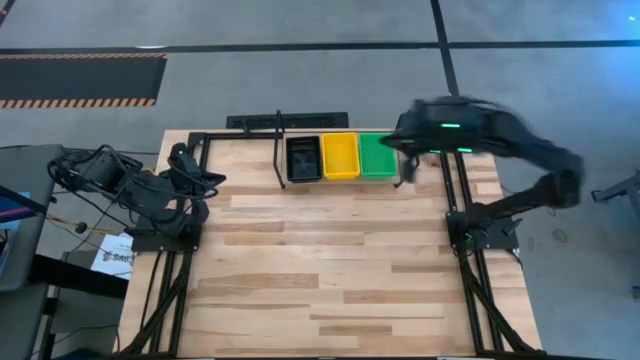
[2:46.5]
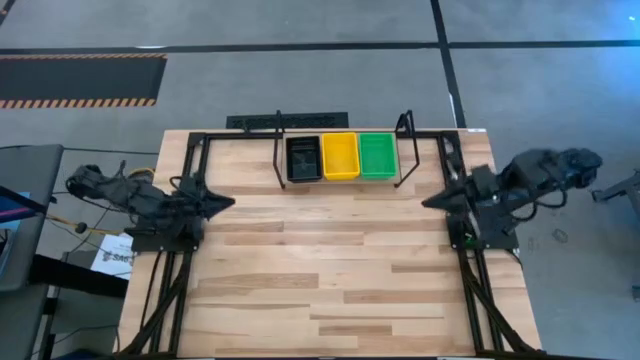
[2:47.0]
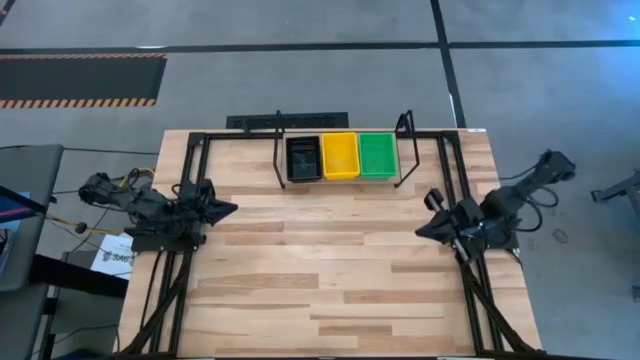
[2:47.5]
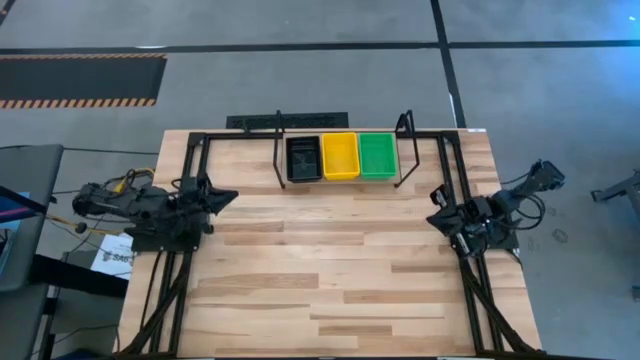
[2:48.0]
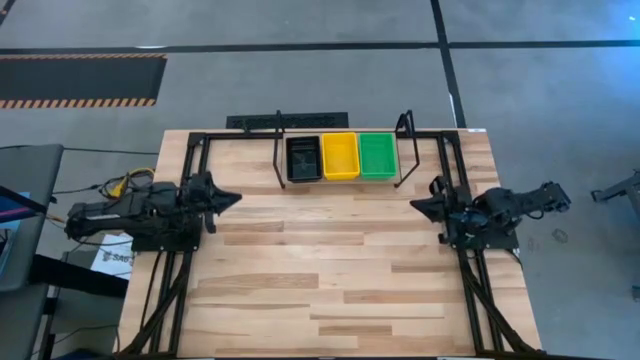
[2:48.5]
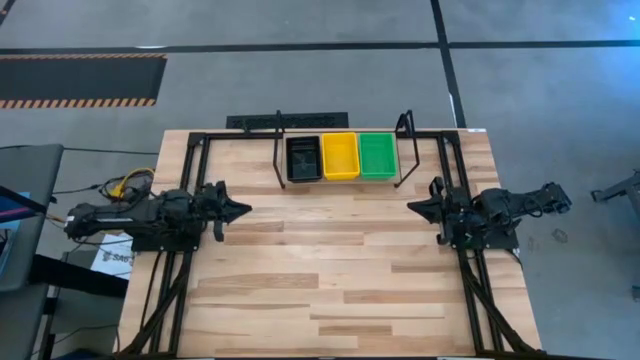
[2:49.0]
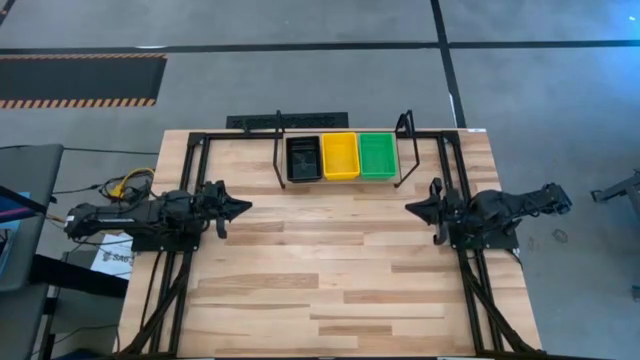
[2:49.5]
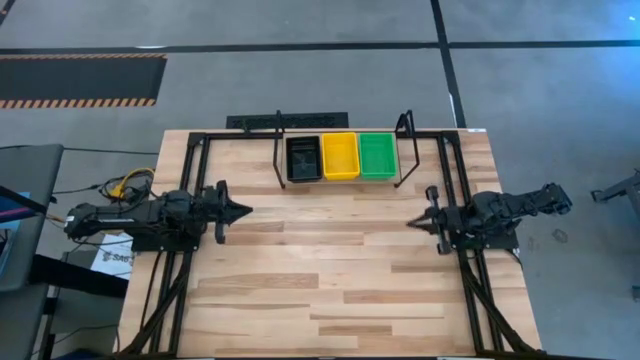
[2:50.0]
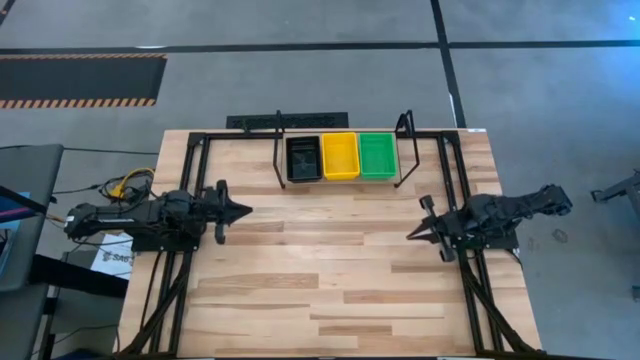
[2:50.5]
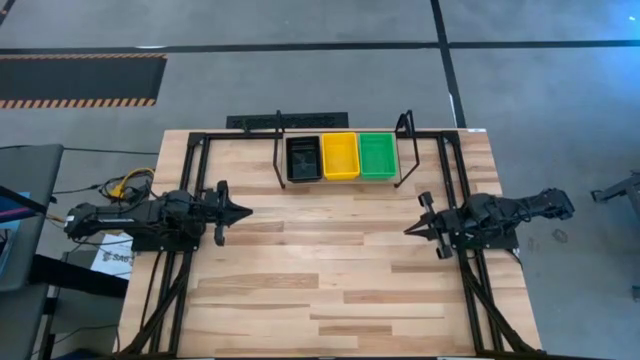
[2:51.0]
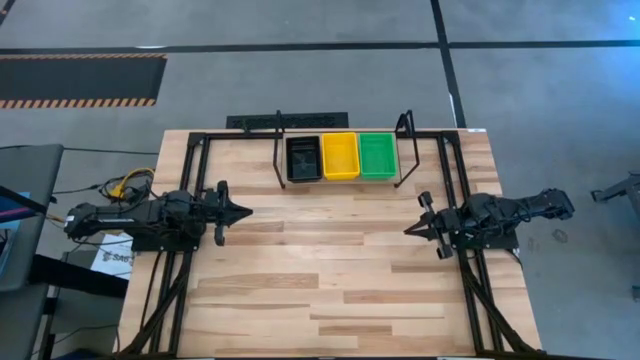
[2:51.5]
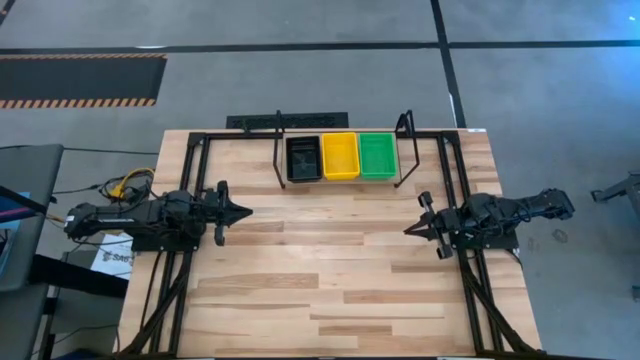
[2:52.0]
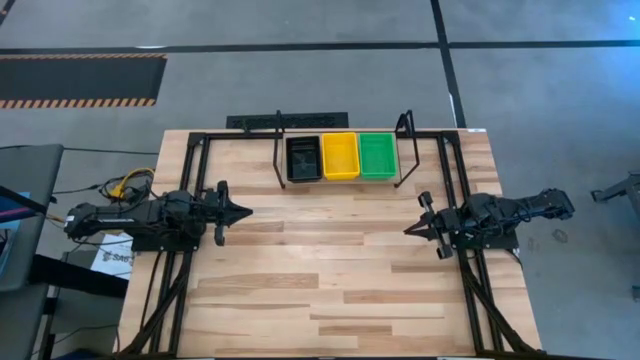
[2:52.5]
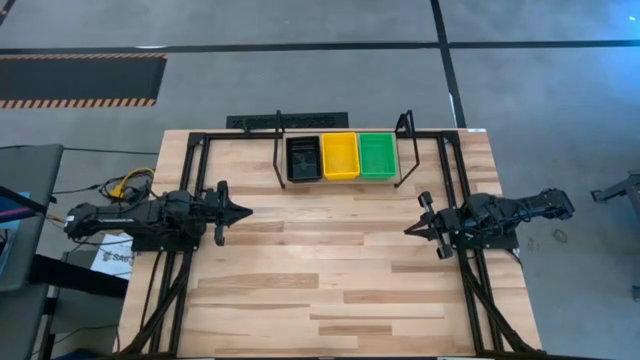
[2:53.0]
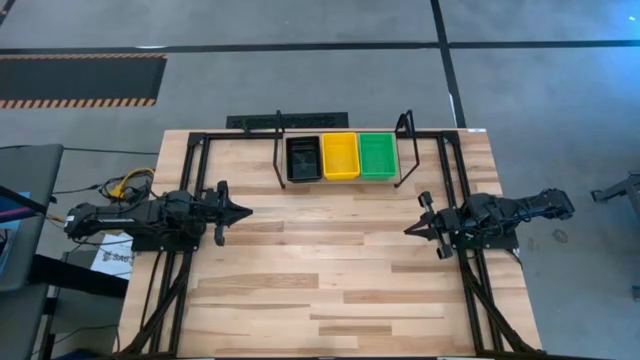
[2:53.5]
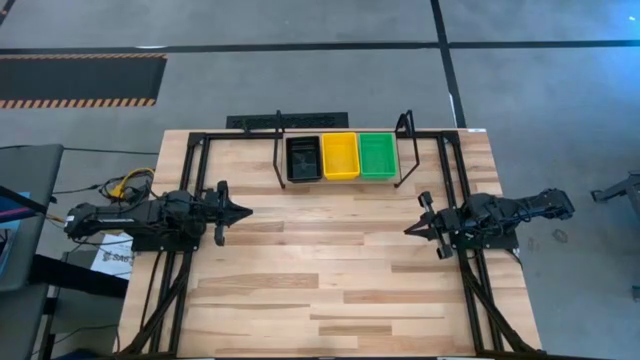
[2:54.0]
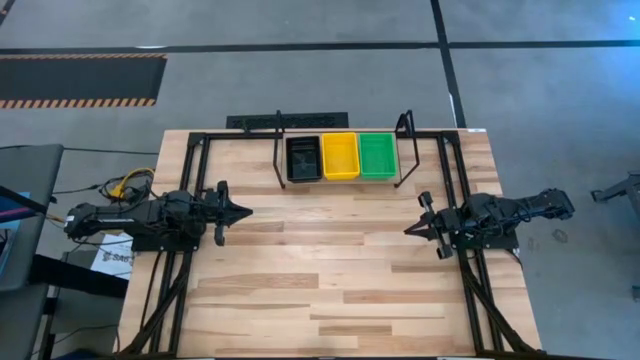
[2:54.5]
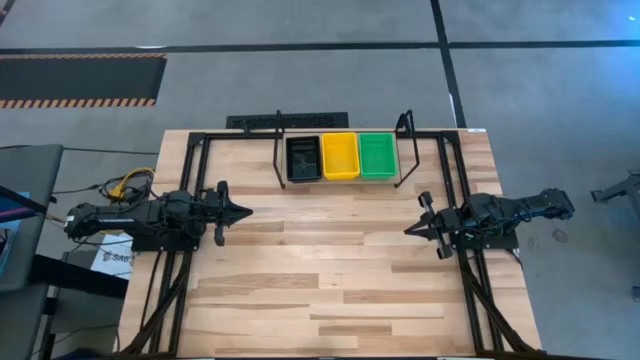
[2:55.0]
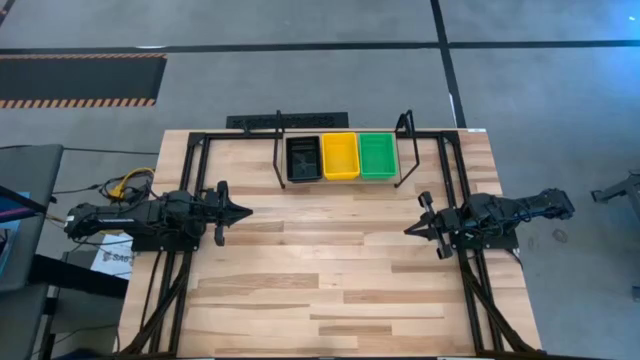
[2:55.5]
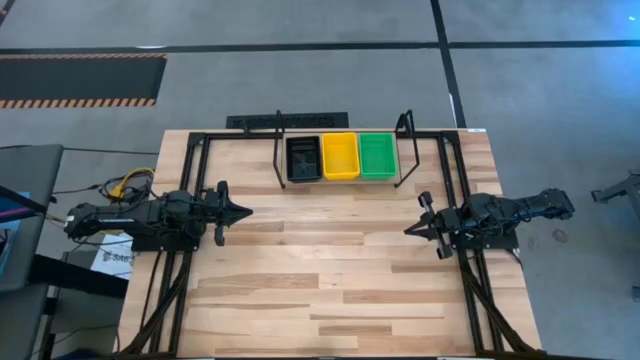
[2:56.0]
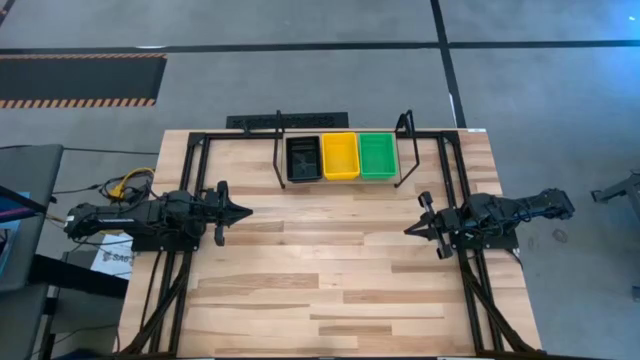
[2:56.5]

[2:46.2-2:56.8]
Task: Stack baskets on shelf by color
Return to Home Position

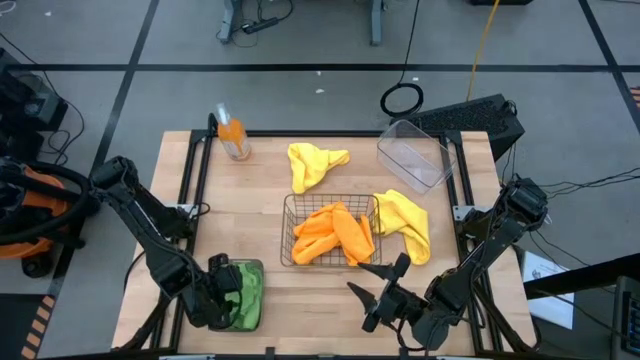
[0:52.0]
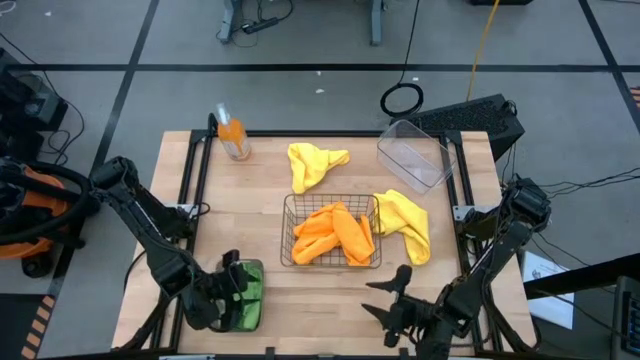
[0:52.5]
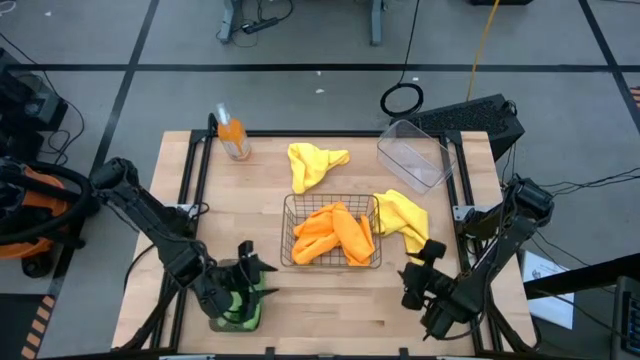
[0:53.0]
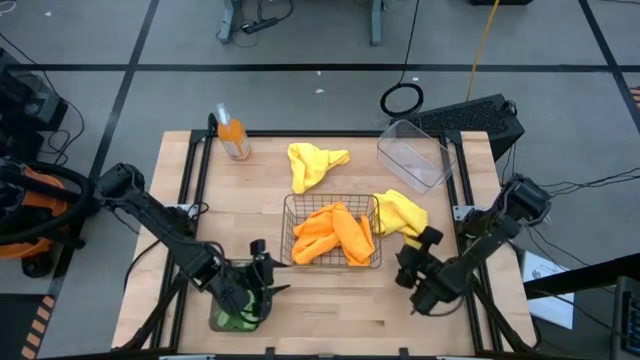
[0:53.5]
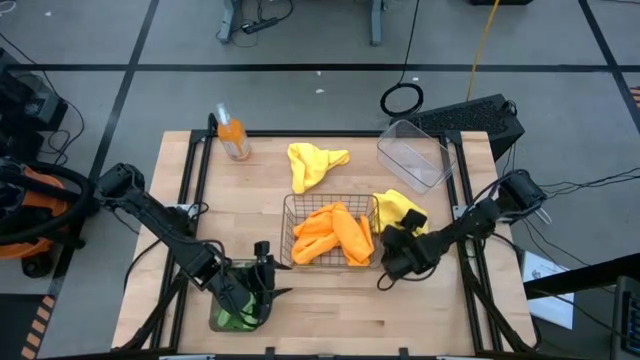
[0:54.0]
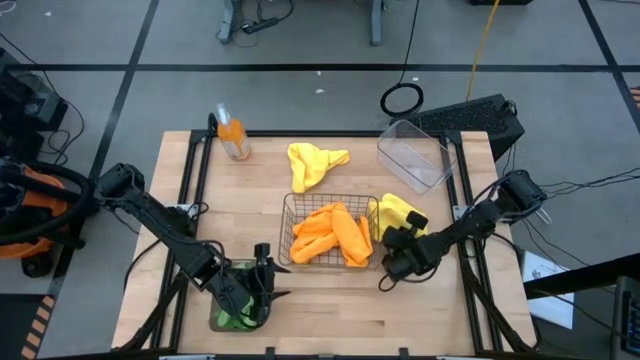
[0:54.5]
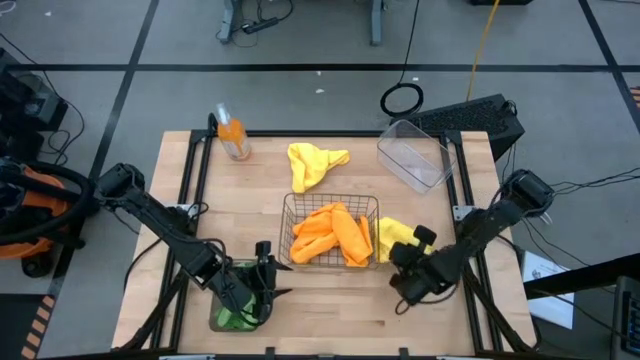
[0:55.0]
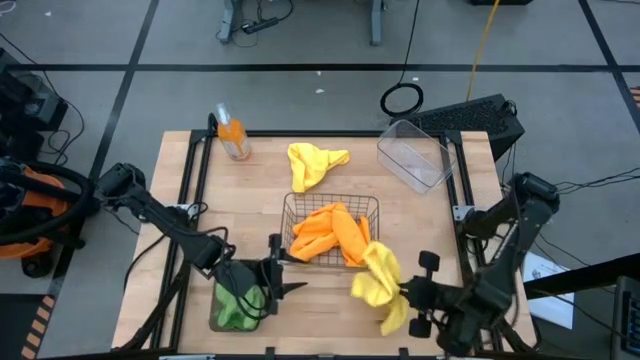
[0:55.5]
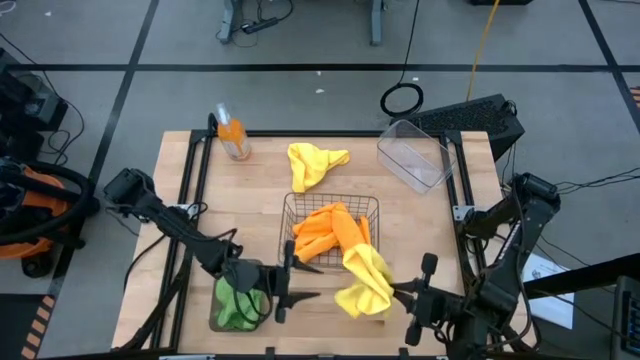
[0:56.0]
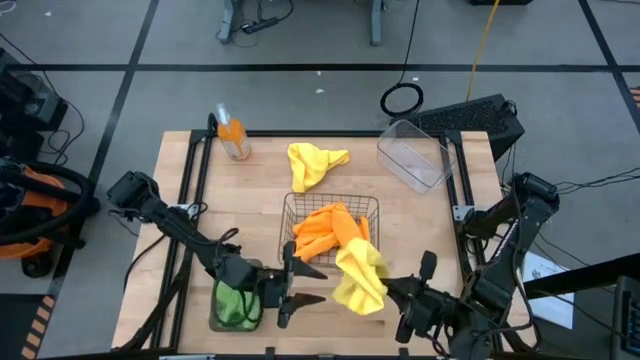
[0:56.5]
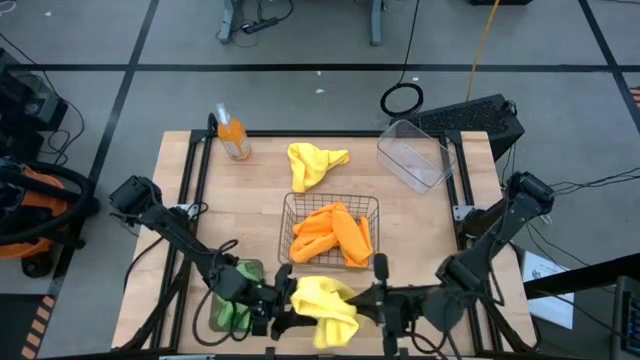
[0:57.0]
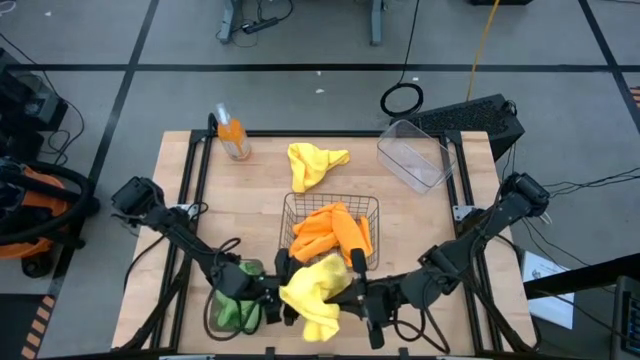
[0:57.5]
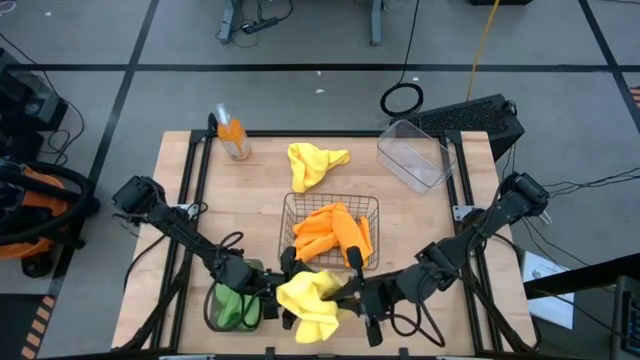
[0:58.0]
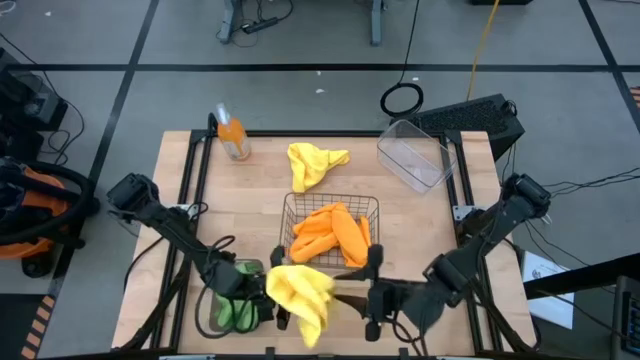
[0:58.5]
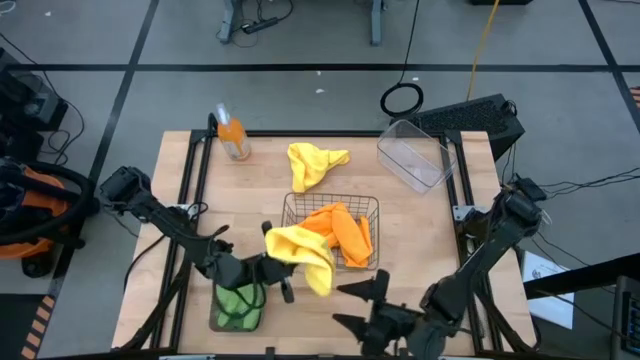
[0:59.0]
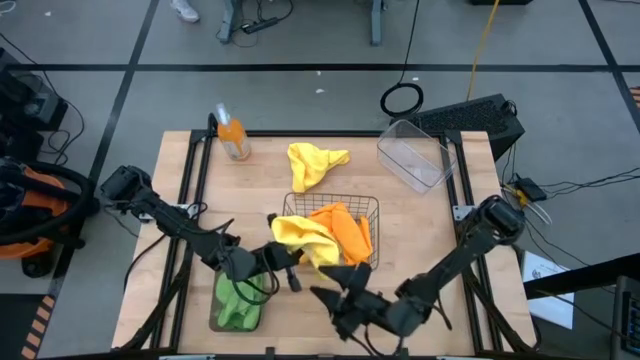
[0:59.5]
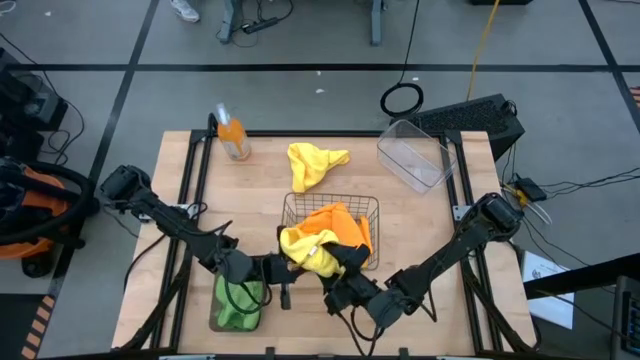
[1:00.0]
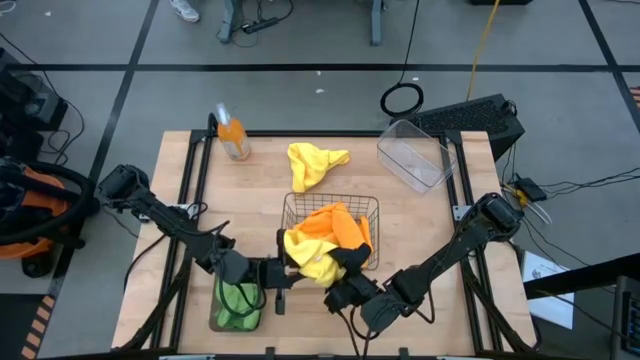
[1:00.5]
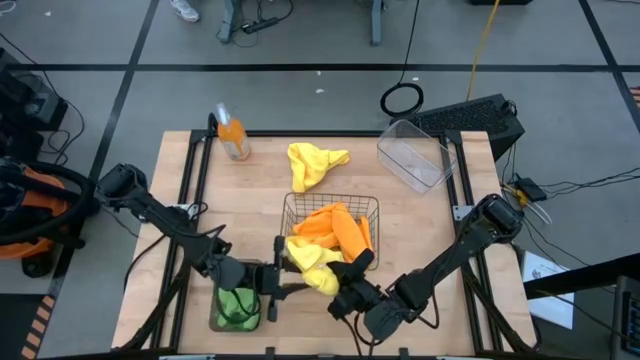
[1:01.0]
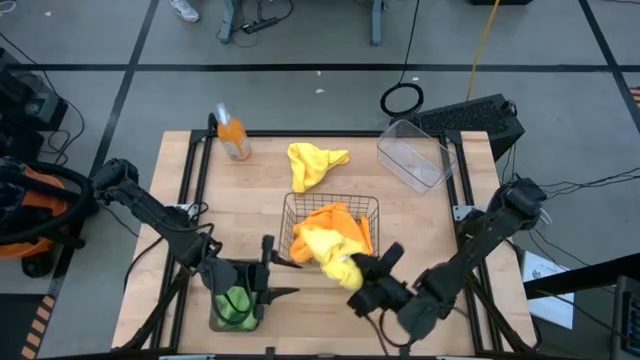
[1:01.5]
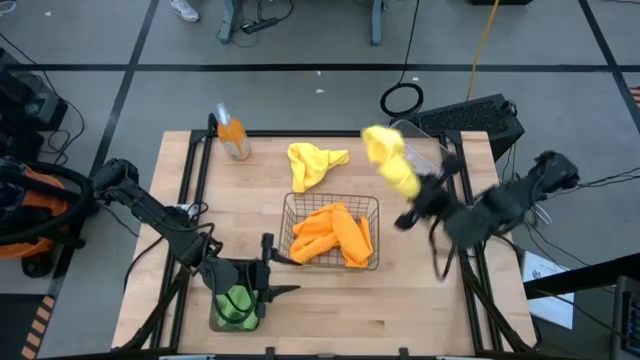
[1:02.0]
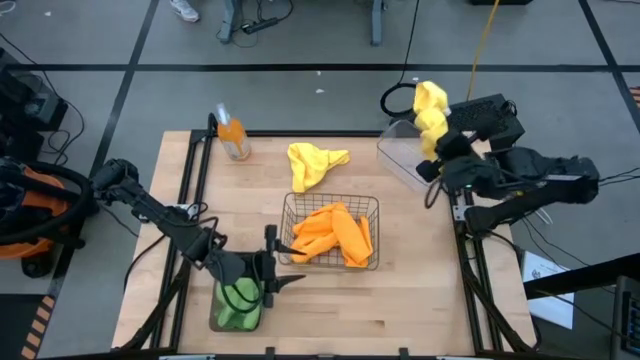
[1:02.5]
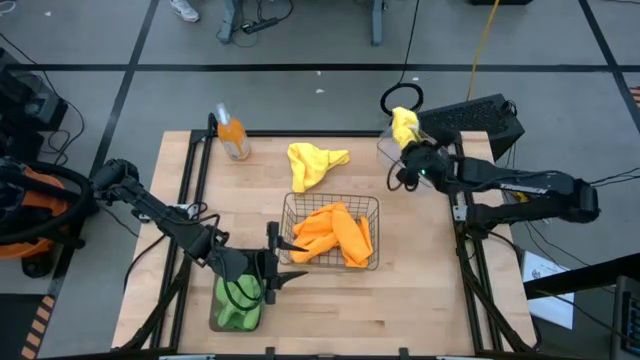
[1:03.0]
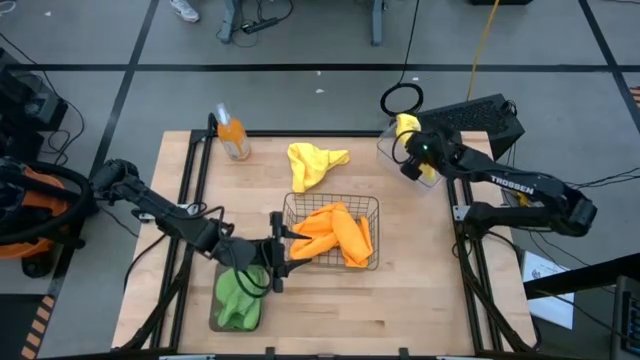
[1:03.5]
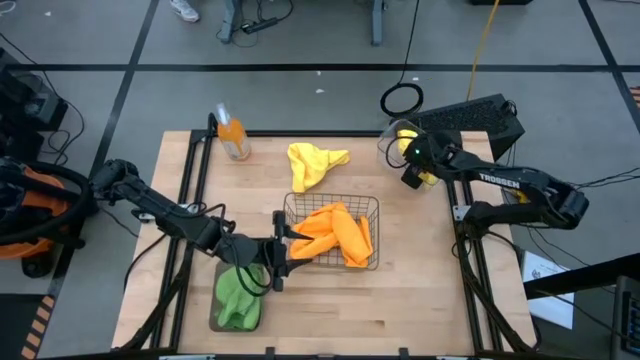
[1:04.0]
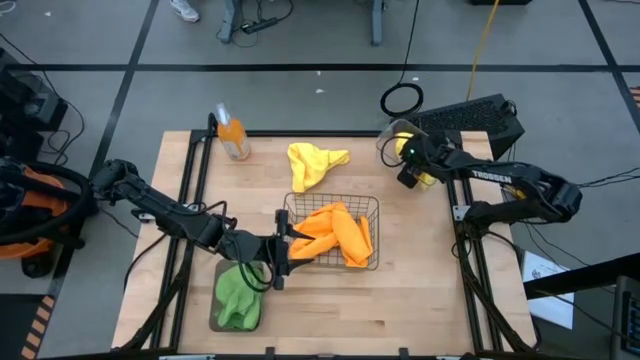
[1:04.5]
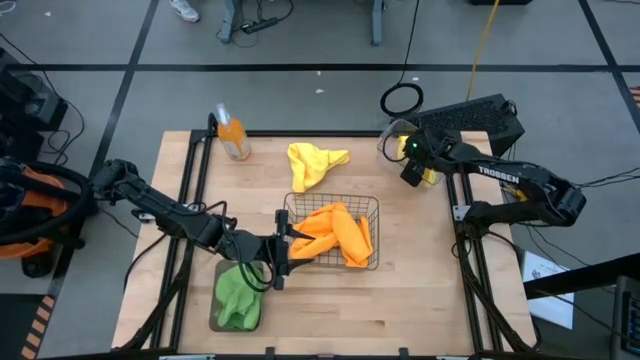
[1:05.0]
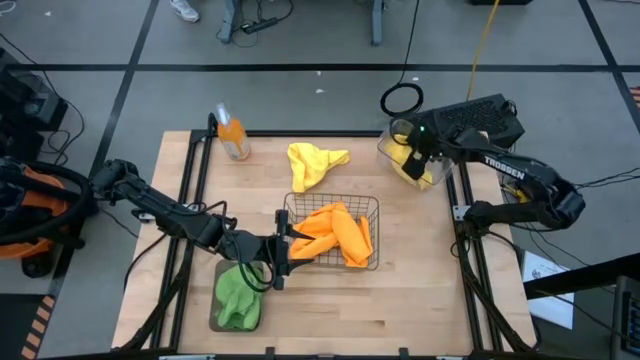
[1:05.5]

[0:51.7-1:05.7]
Task: Sort microfiber towel by color & place in baskets
Put the right yellow microfiber towel into the transparent bin
